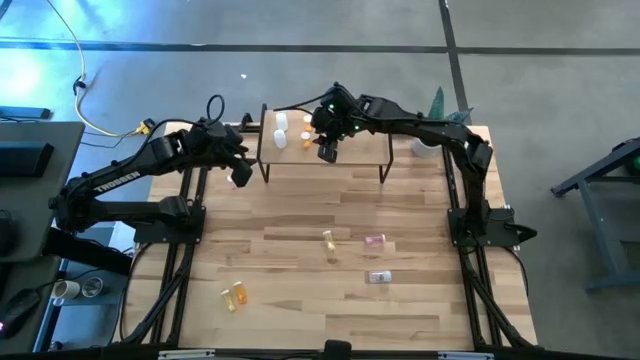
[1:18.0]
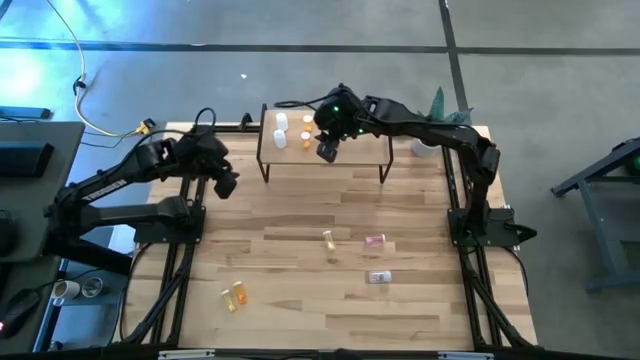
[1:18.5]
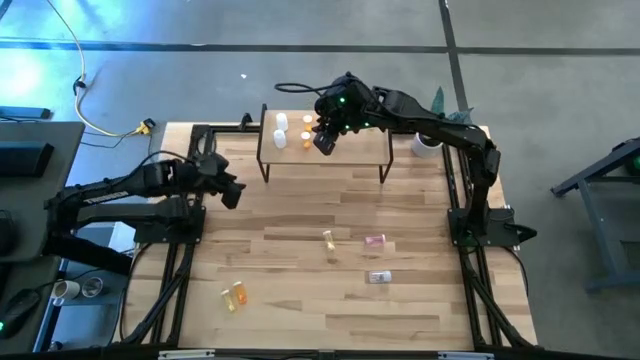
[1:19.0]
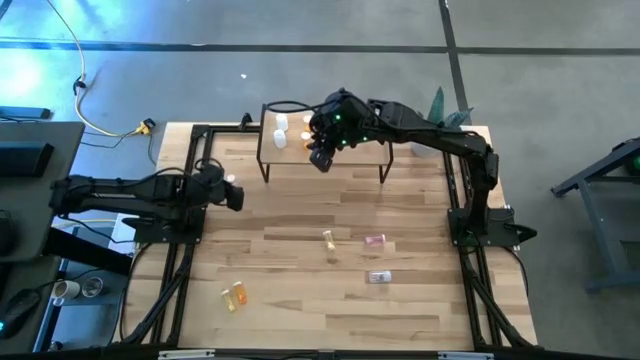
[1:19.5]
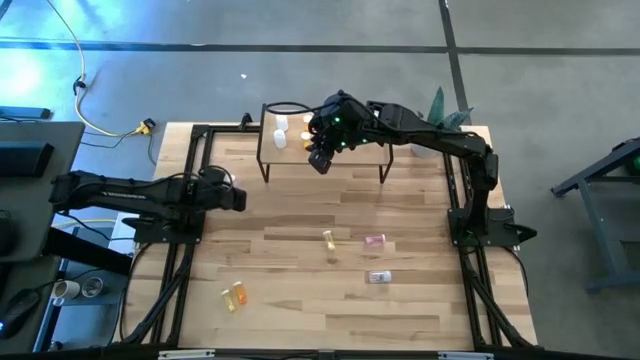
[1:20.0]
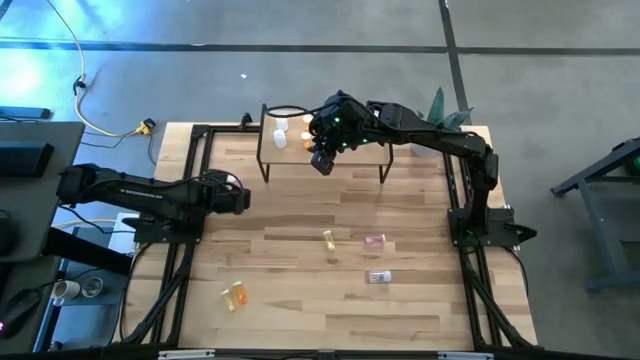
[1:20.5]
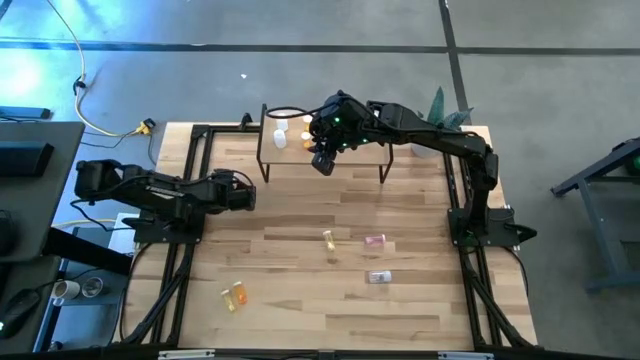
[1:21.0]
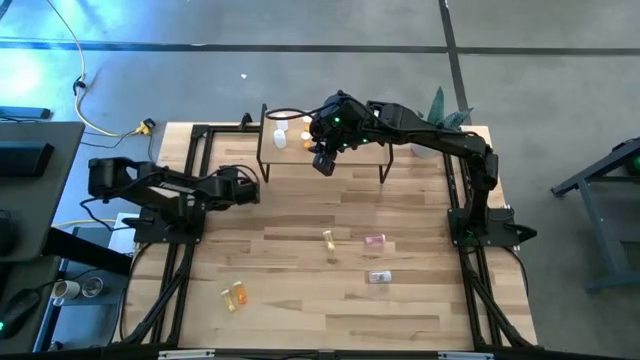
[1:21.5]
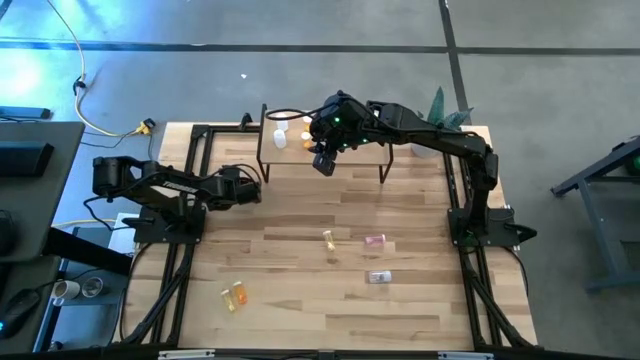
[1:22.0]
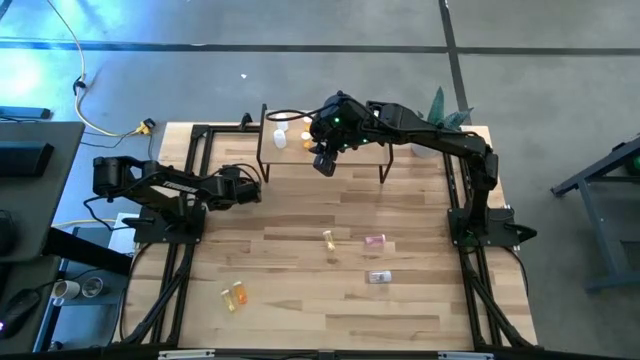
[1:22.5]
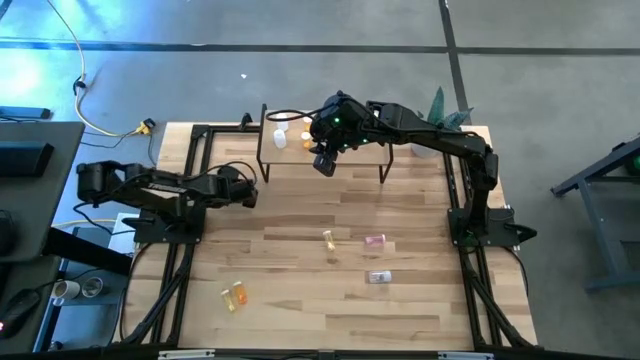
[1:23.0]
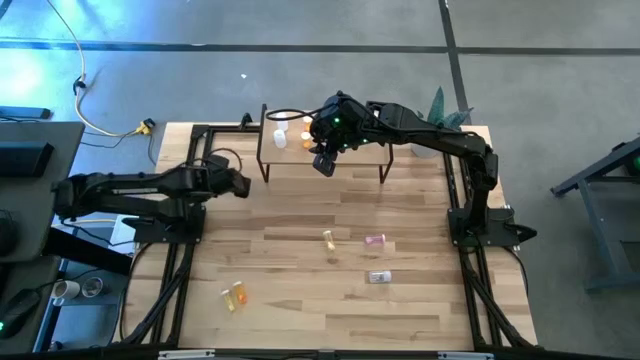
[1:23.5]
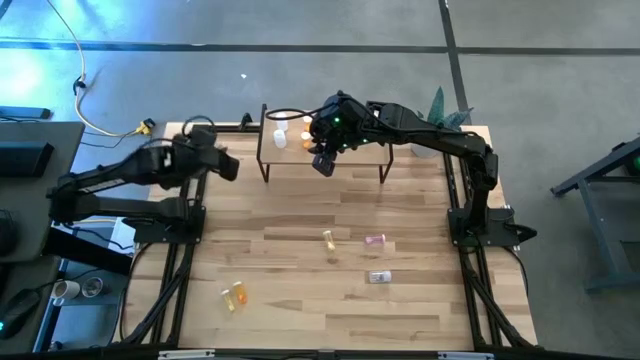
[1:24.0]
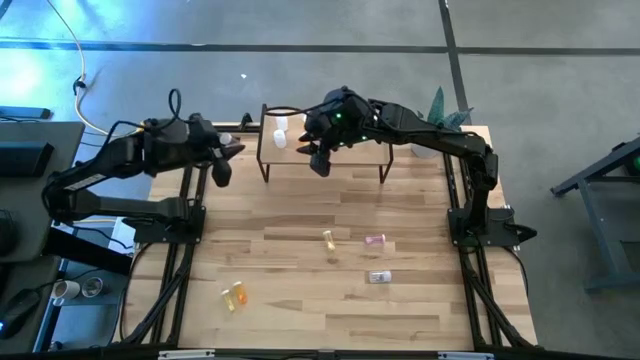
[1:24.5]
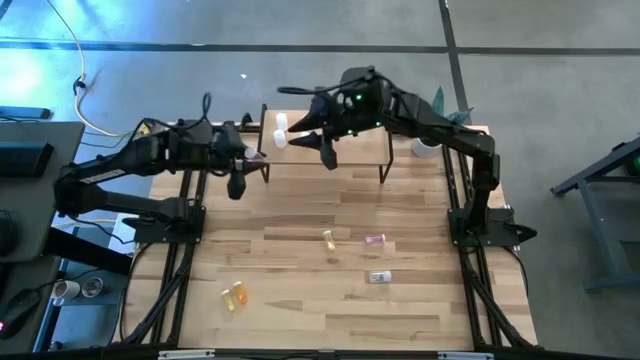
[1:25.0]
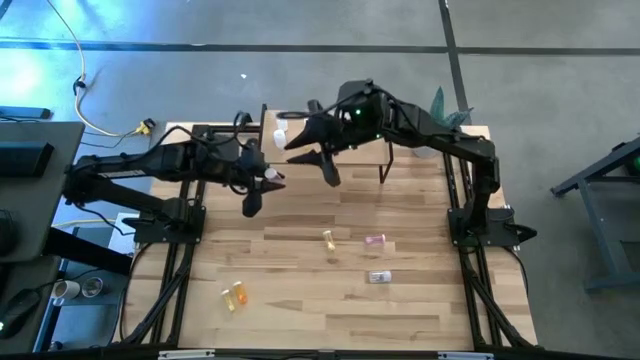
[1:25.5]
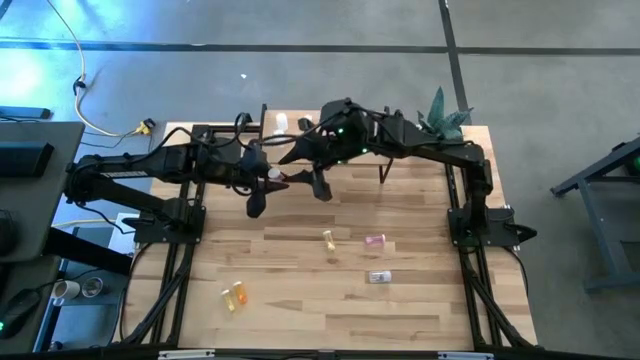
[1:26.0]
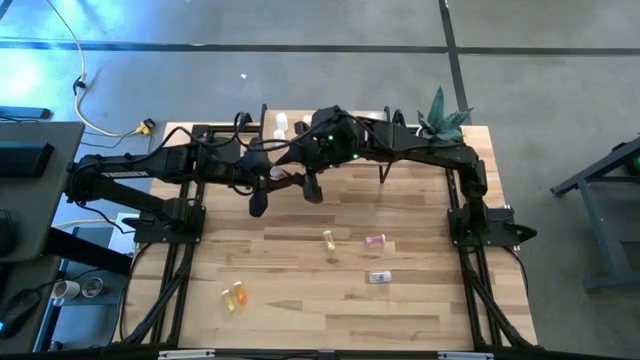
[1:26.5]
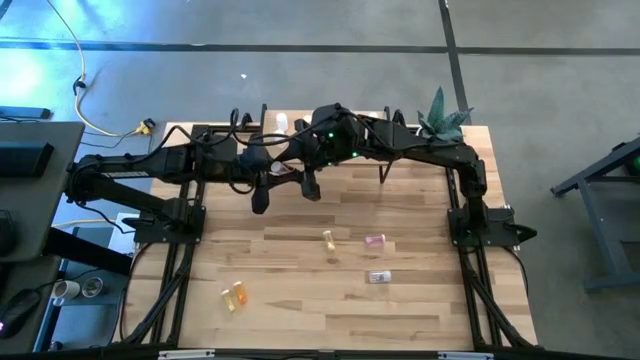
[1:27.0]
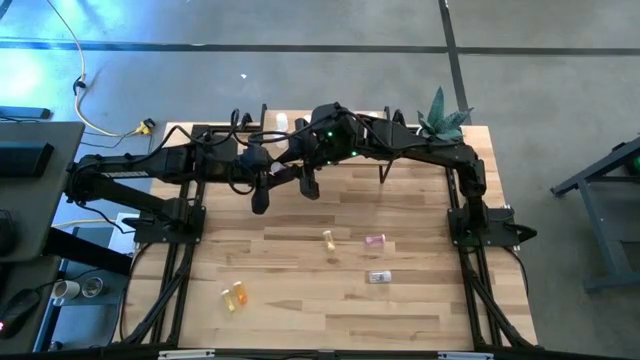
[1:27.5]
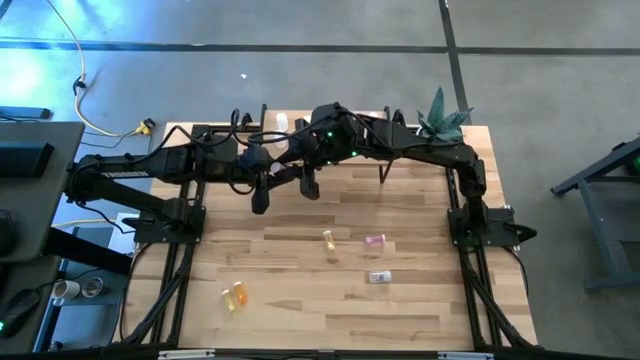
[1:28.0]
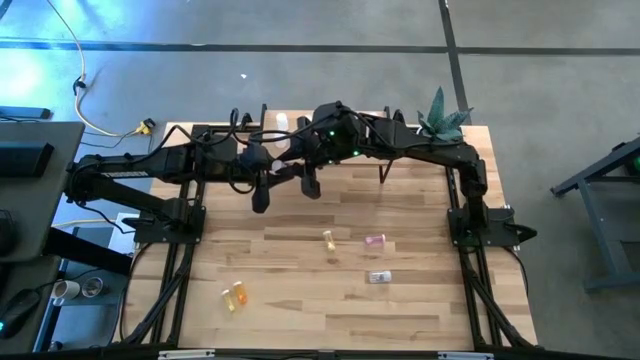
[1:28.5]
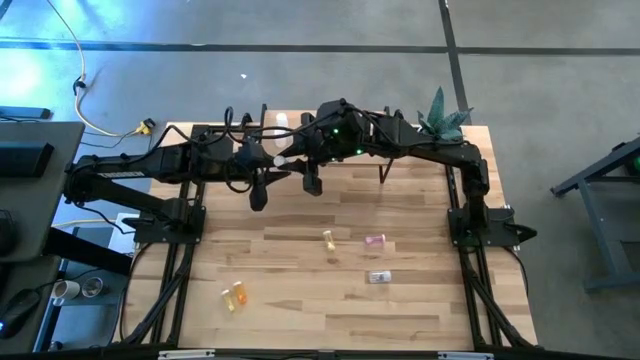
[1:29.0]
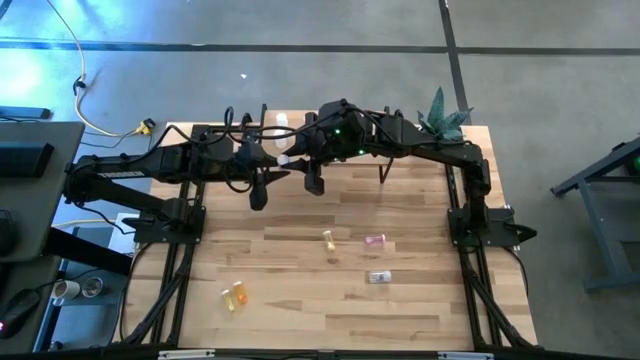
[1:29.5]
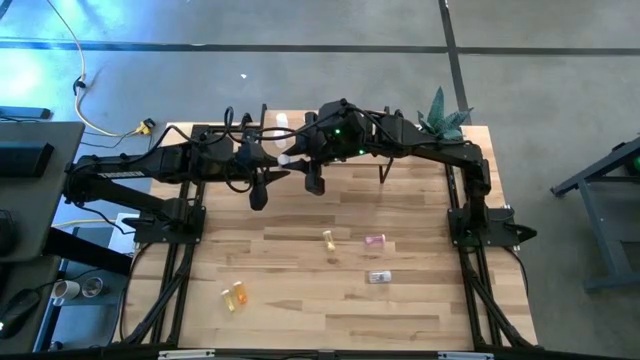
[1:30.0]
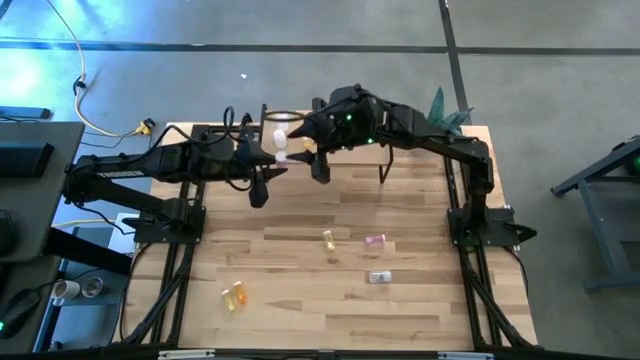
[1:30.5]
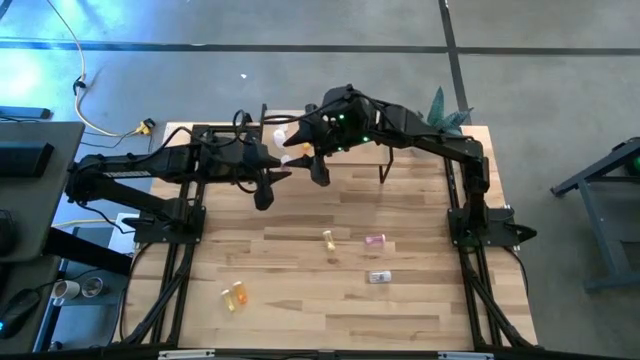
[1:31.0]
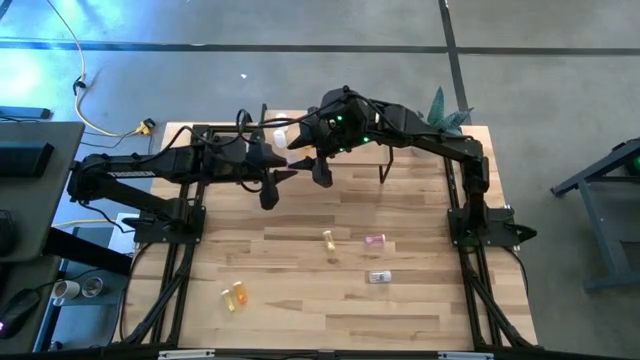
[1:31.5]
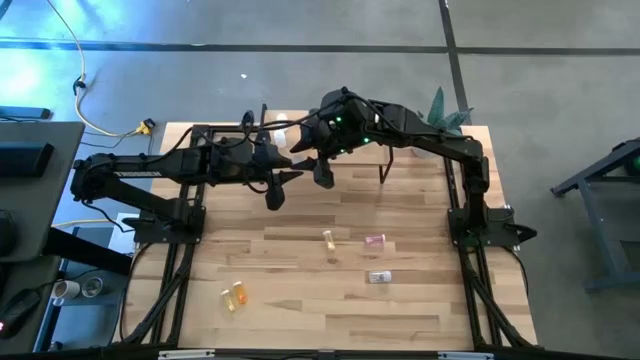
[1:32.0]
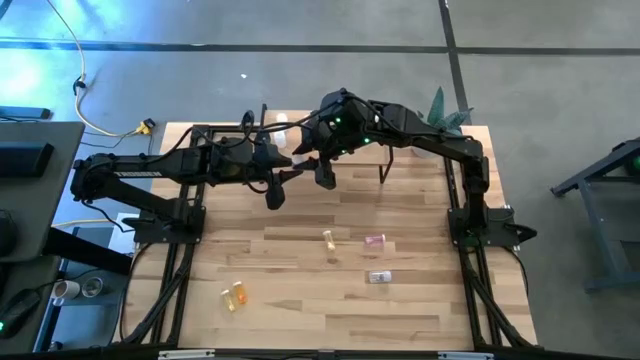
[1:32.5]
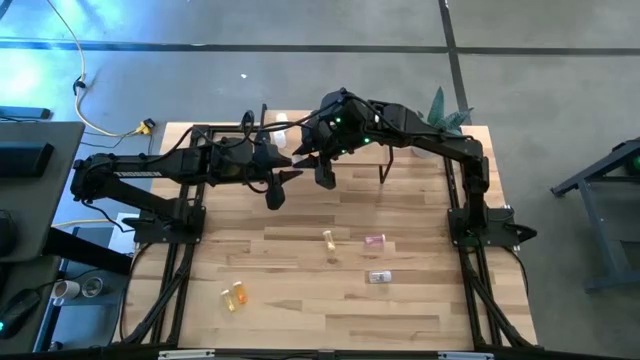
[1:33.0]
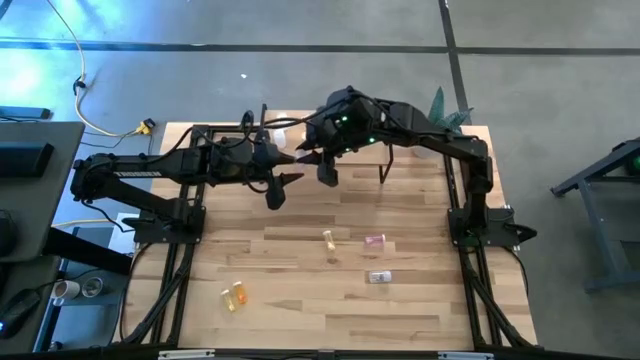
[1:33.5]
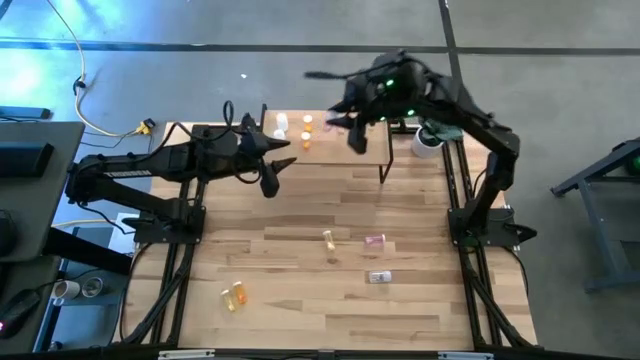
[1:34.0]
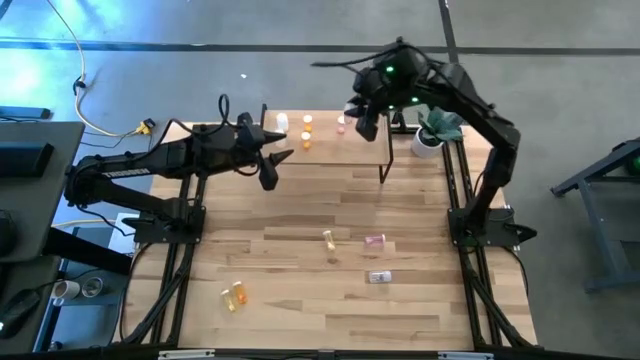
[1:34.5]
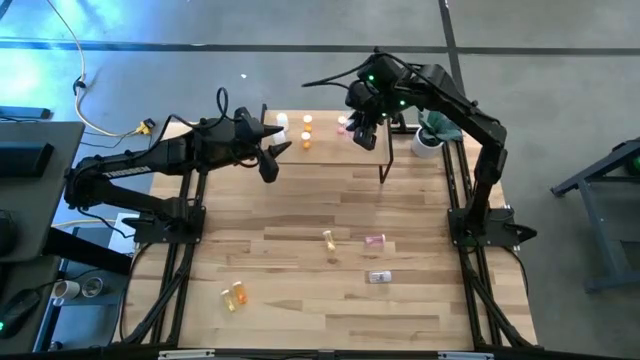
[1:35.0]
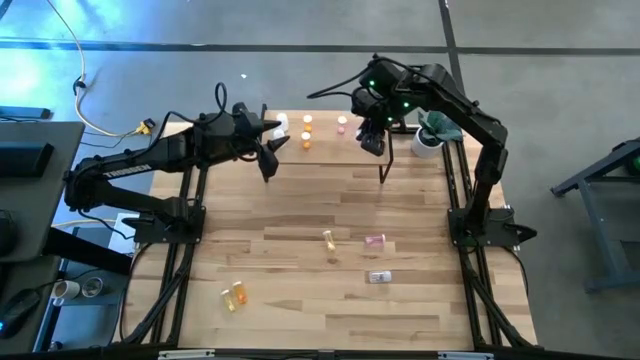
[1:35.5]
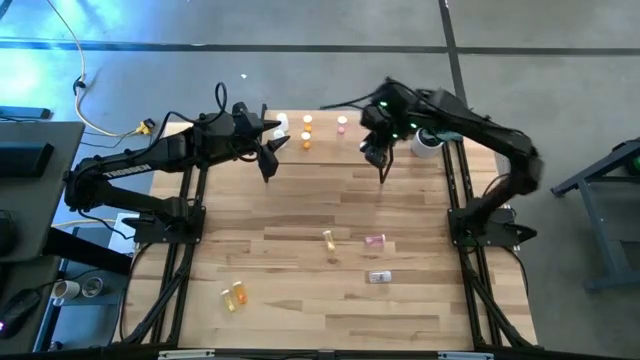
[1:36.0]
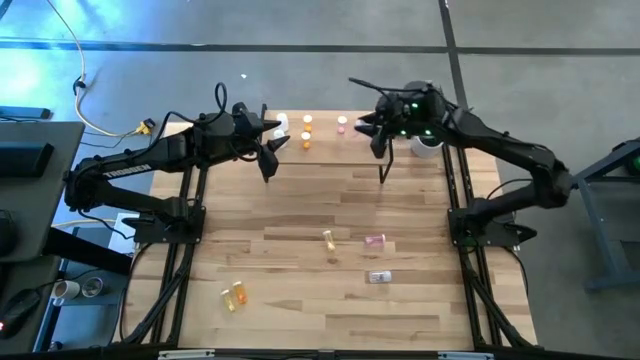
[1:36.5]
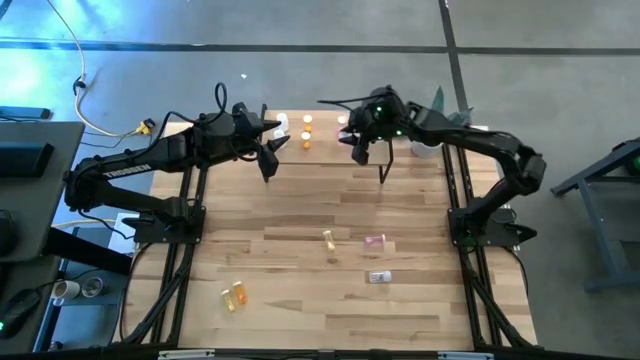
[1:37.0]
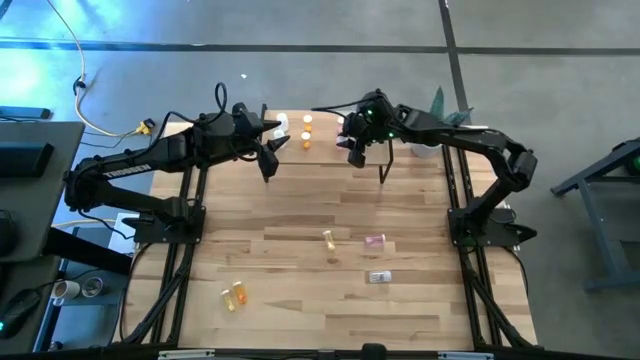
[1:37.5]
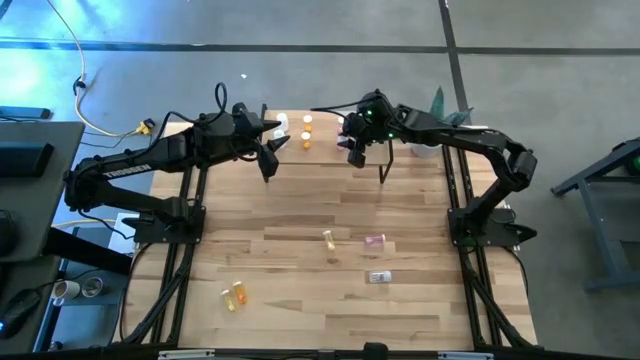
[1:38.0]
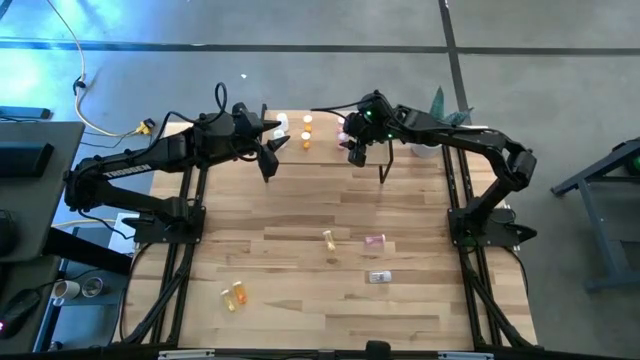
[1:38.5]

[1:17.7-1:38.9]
Task: Pick and place medicine bottles onto shelf by color
Put the top pink pill bottle aligned with the other pink pill bottle on the shelf
